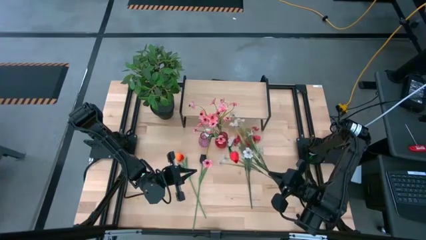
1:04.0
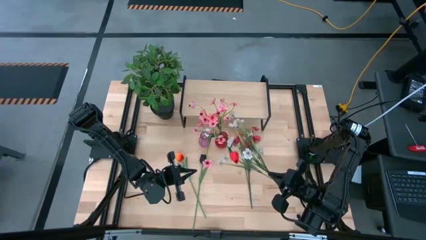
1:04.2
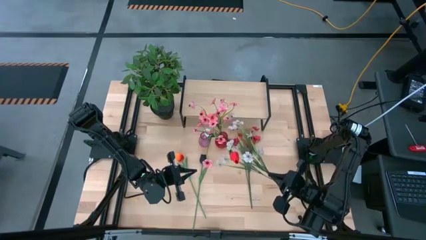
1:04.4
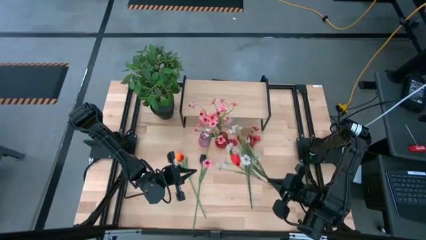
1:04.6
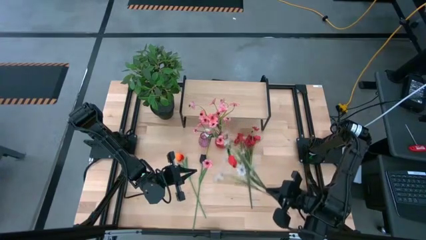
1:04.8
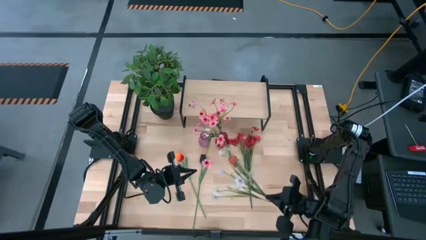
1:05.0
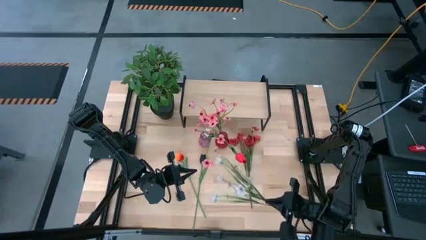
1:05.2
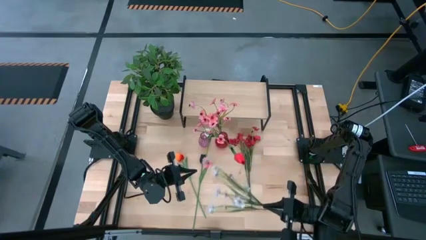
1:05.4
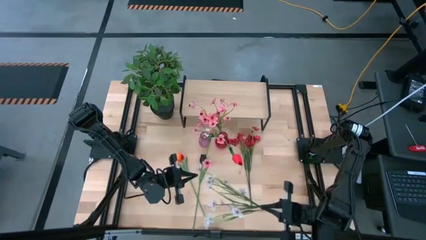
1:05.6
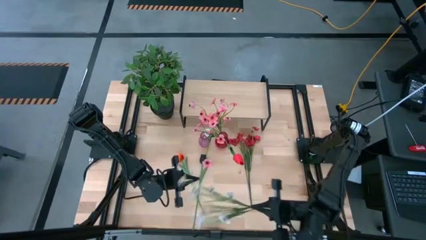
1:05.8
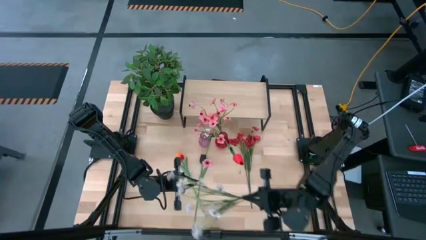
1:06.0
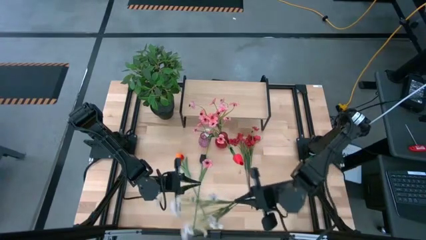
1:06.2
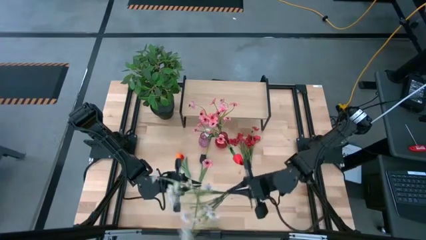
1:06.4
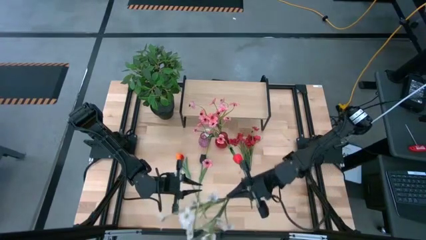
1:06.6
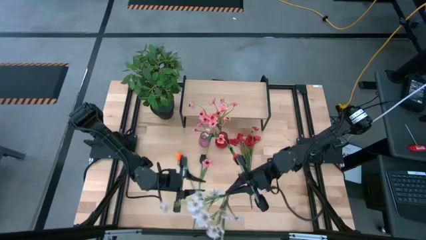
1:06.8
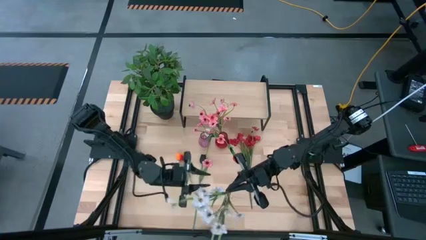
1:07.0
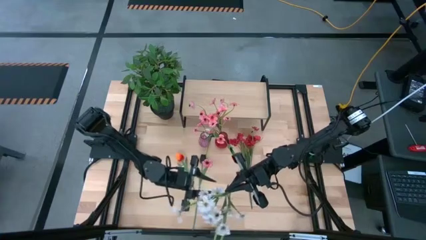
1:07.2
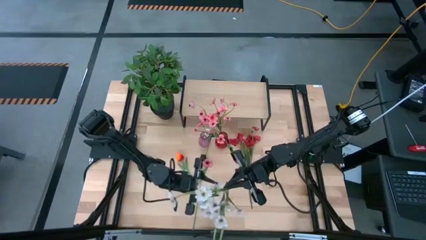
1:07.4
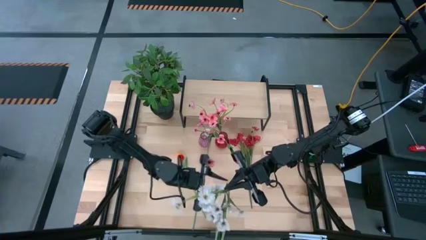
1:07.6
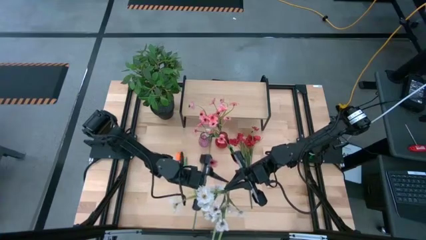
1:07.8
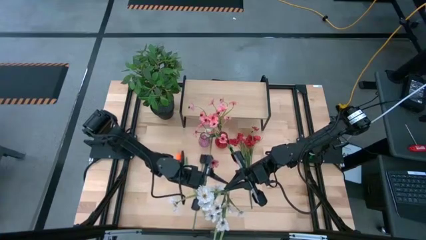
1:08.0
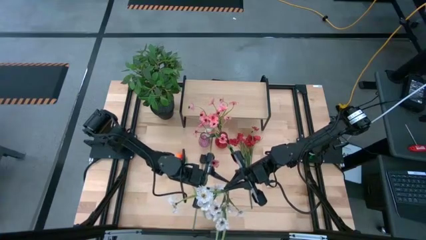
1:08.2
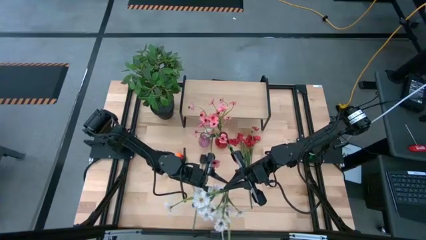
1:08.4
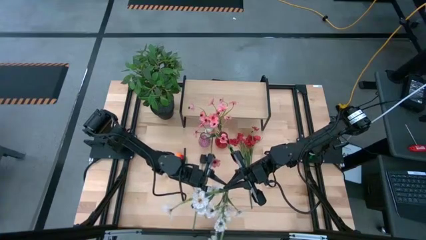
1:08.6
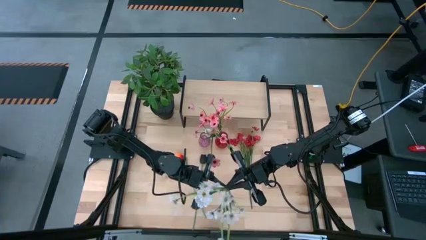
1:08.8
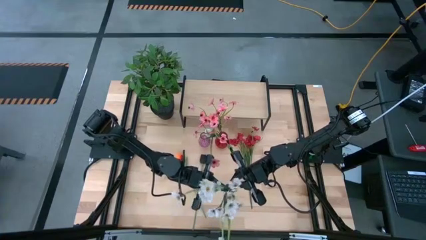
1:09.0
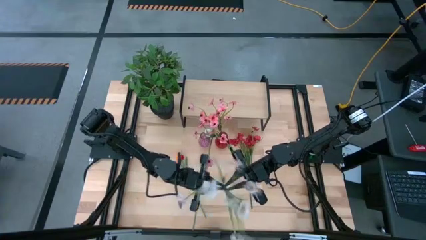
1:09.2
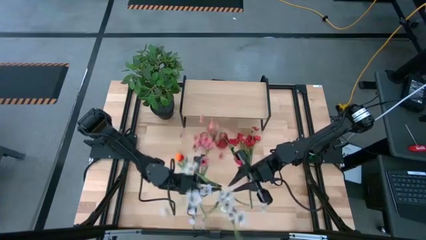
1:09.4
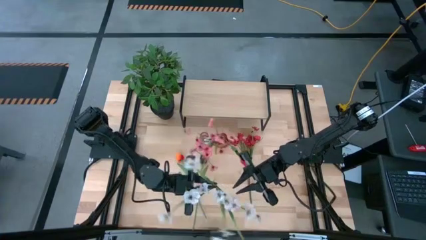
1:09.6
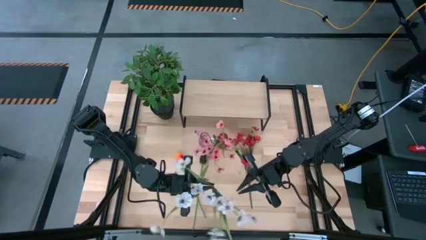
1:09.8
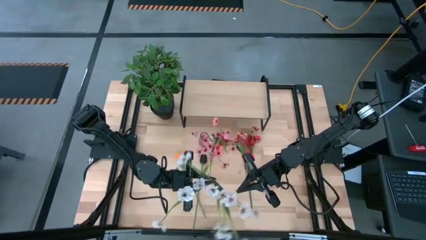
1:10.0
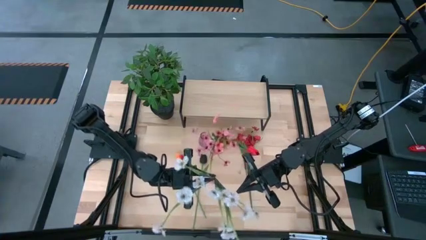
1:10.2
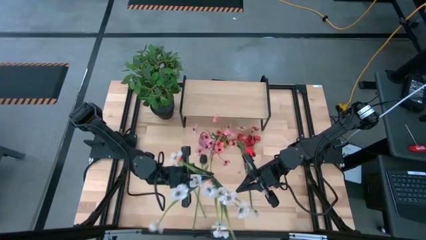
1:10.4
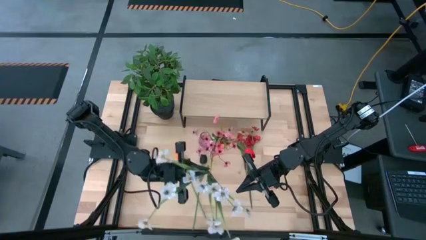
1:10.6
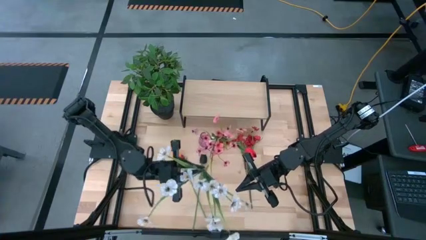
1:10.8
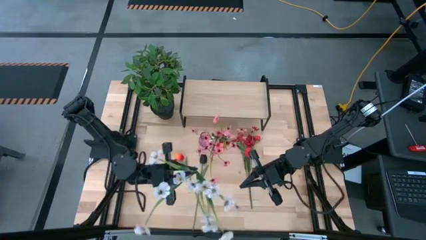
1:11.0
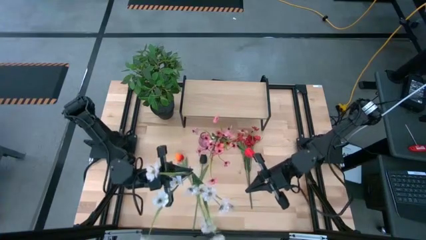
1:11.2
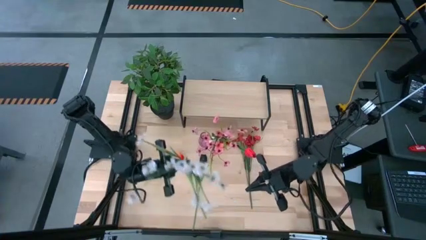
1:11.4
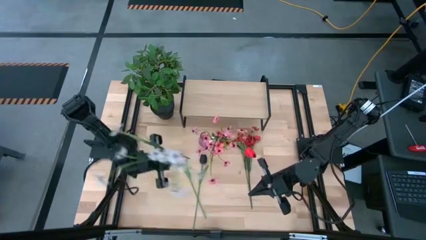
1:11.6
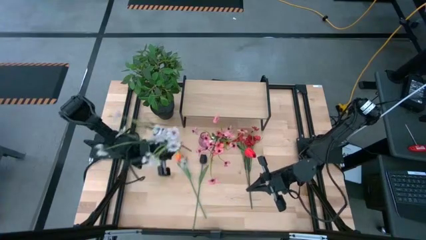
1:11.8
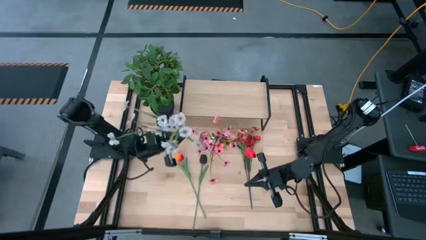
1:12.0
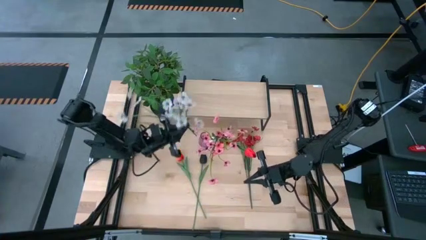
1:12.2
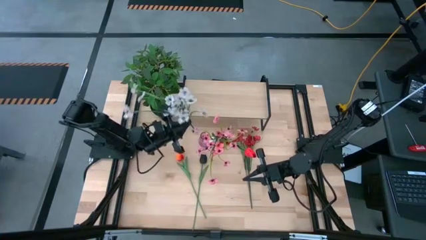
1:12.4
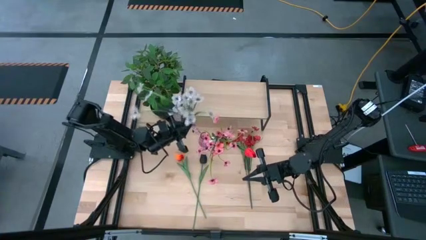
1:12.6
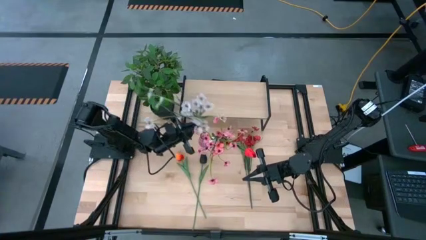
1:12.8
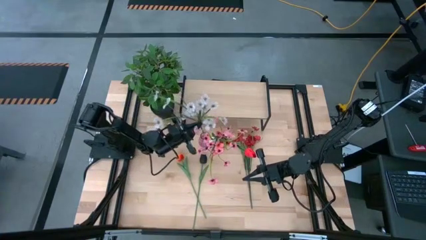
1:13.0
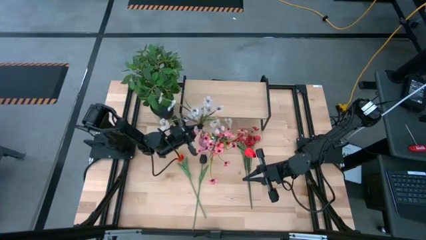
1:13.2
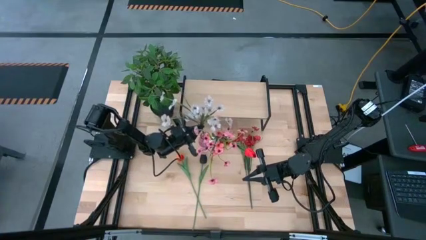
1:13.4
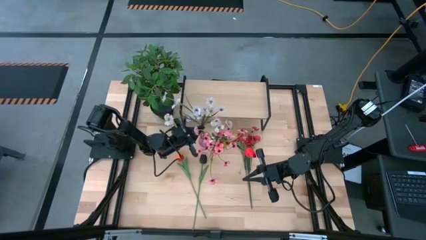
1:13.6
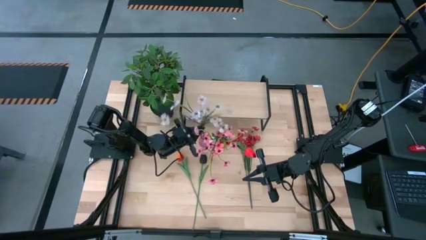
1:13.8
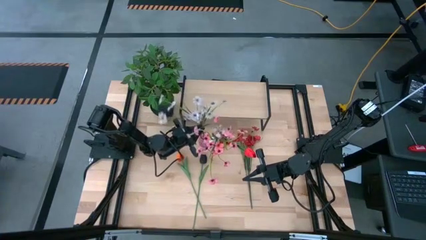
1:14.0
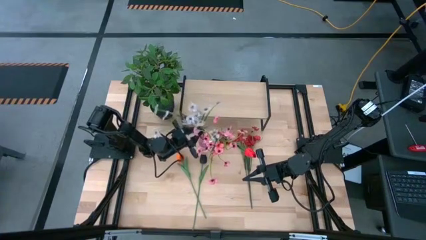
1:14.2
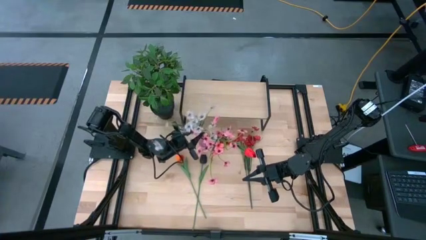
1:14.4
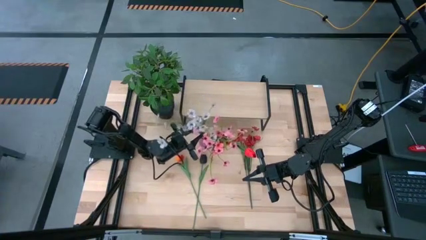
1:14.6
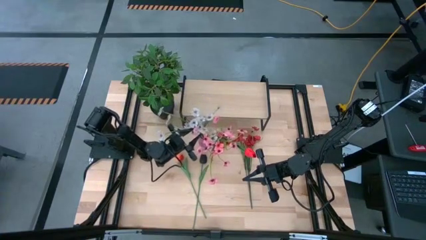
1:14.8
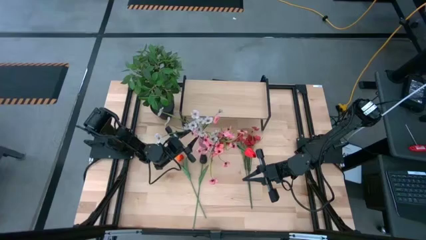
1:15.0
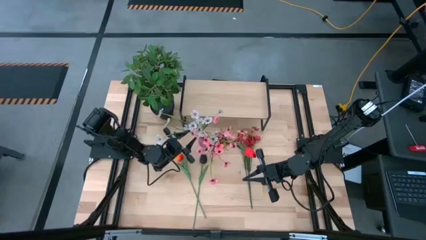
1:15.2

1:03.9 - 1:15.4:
Task: Pick and place flowers into a vace then onto a shelf
Put the white flowers into the purple vase

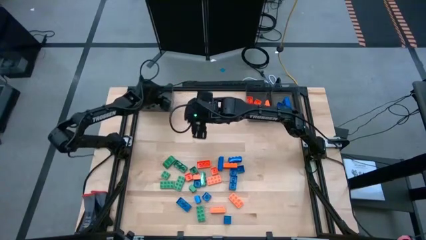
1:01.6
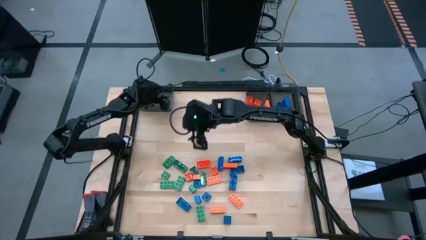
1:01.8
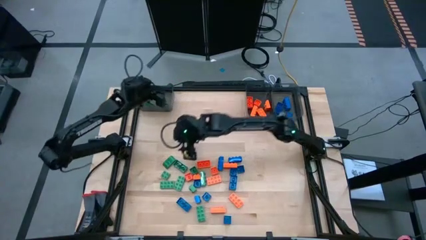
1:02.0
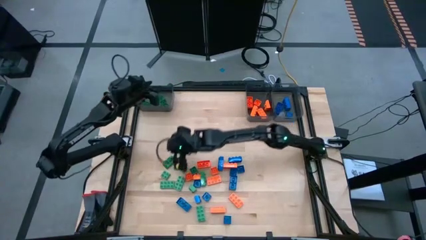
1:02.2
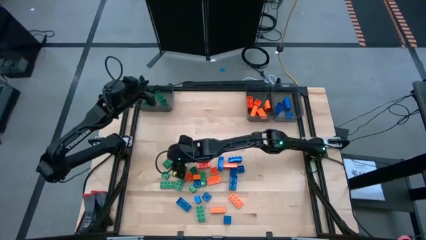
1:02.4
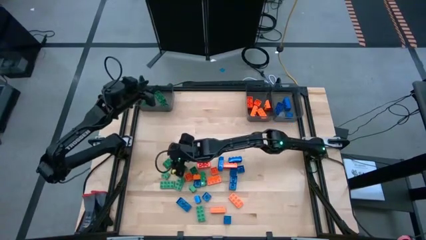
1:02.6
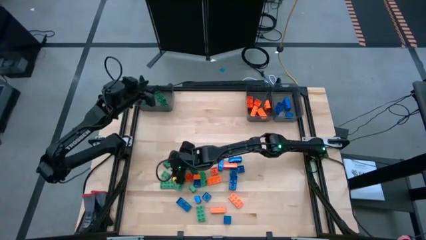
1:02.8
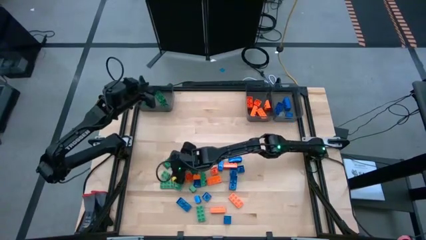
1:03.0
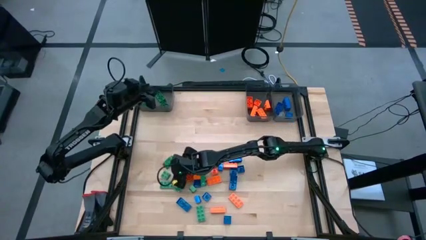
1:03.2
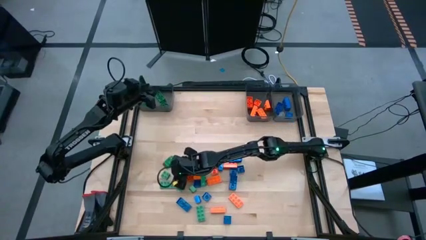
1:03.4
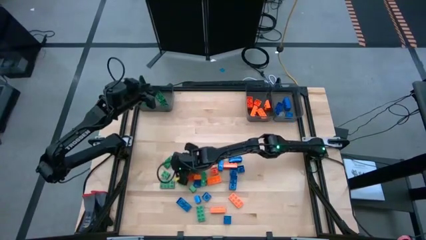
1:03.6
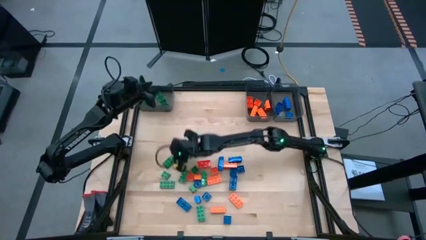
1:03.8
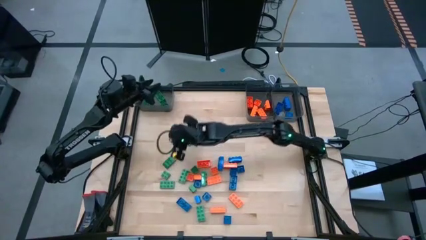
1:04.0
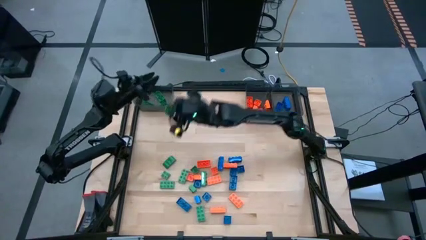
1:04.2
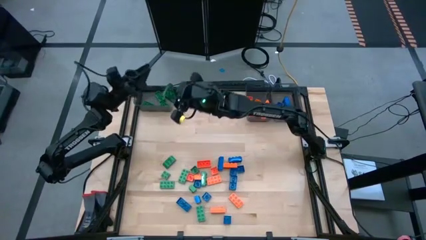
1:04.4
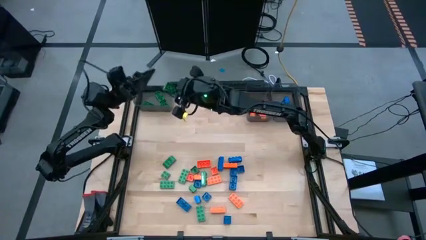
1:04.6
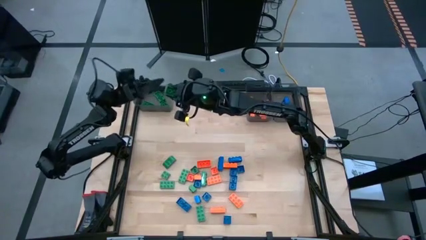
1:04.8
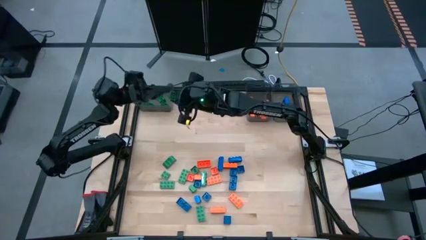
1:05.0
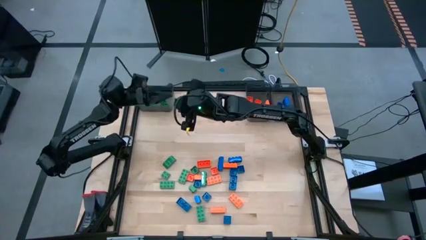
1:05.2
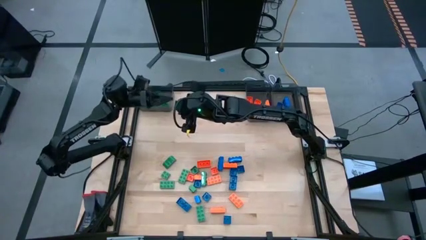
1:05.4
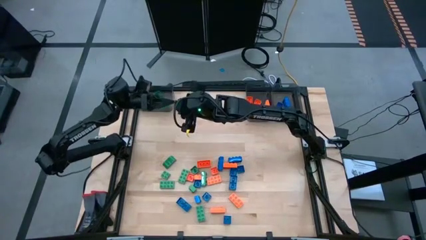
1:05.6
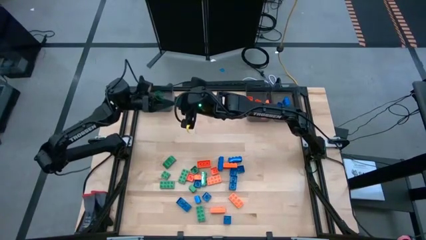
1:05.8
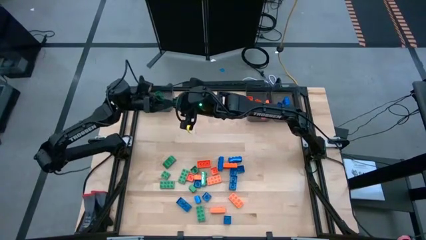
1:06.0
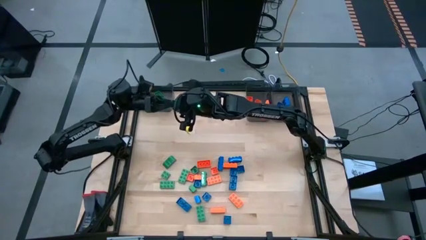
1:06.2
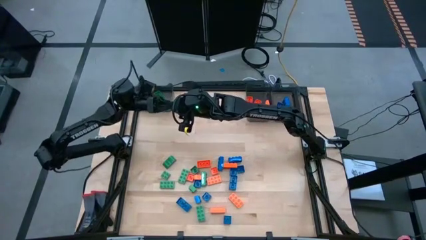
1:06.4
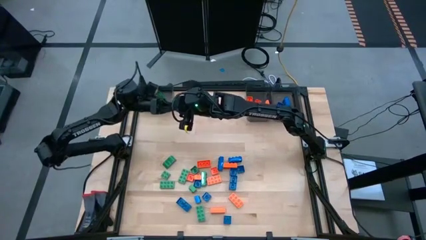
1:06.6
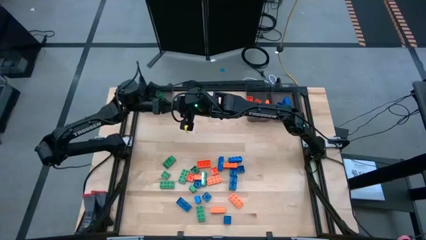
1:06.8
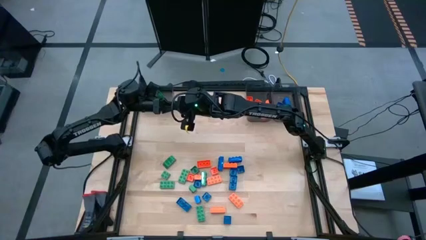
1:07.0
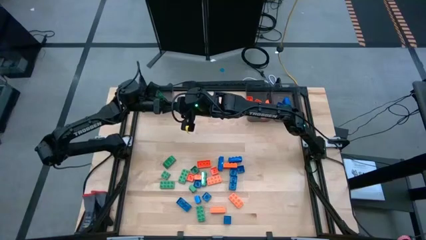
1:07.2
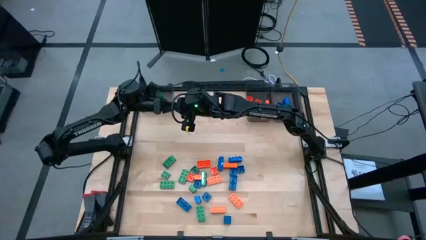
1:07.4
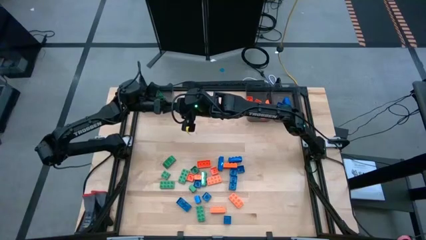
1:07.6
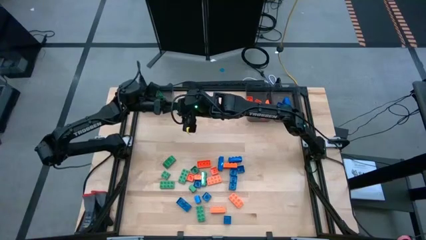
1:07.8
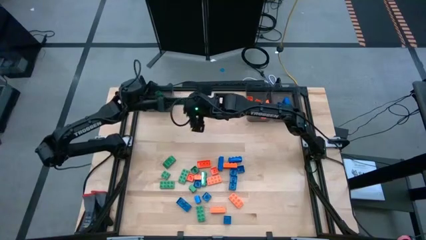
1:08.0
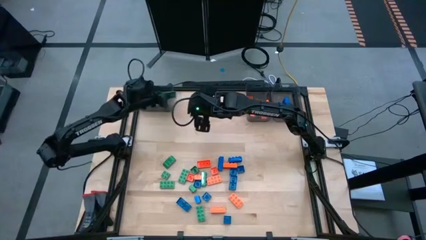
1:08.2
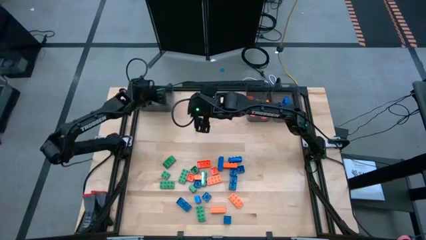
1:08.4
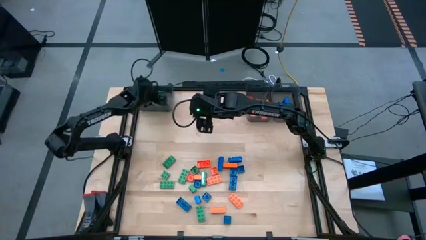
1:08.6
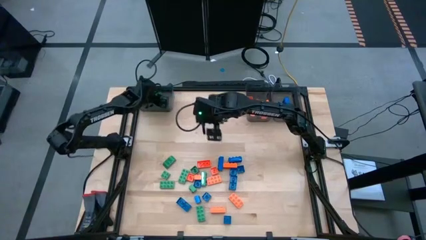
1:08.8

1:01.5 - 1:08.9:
Task: Sort blocks
Put the green game piece into the left black bin
